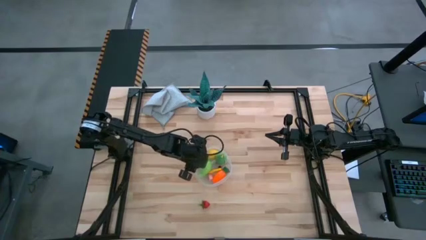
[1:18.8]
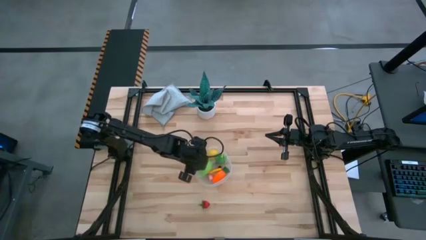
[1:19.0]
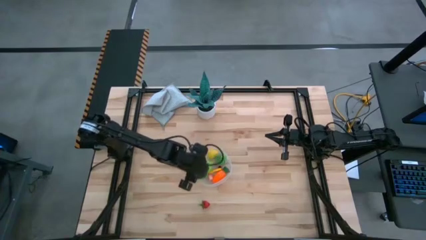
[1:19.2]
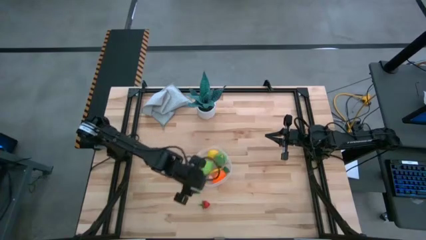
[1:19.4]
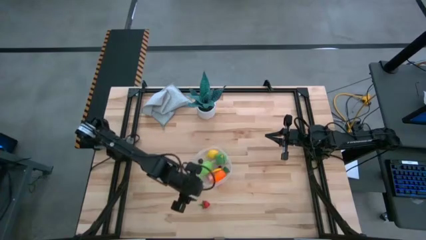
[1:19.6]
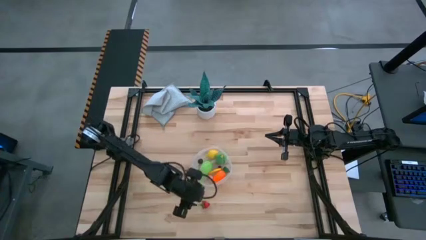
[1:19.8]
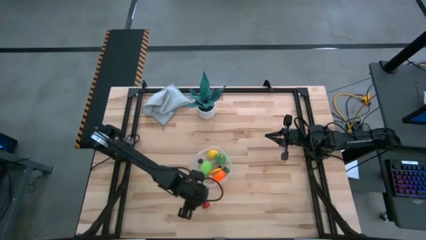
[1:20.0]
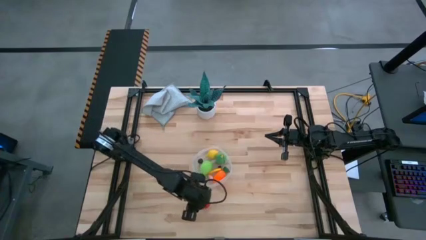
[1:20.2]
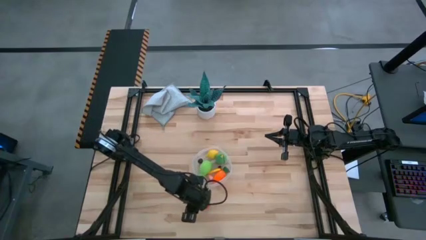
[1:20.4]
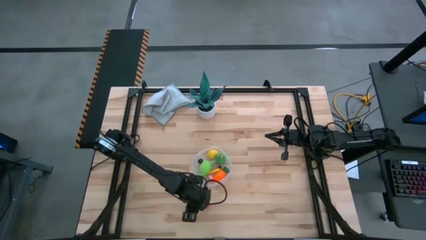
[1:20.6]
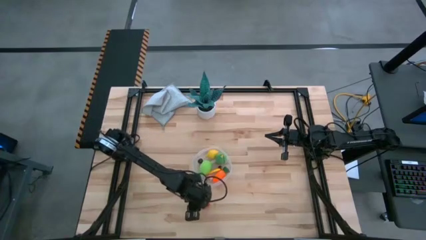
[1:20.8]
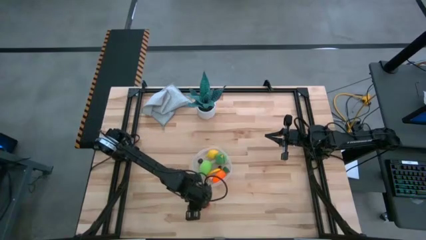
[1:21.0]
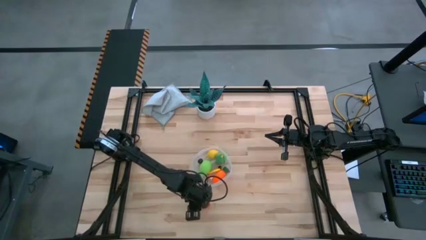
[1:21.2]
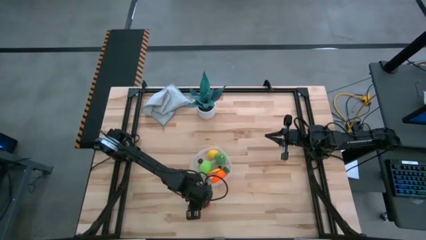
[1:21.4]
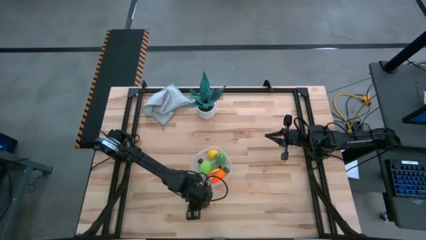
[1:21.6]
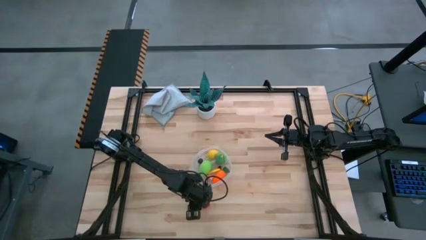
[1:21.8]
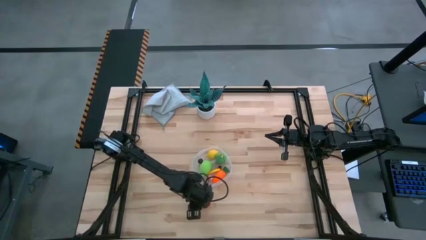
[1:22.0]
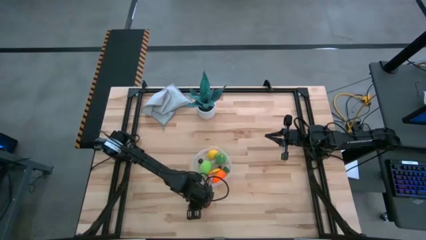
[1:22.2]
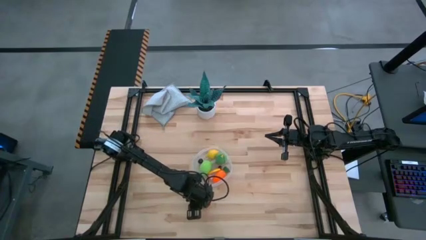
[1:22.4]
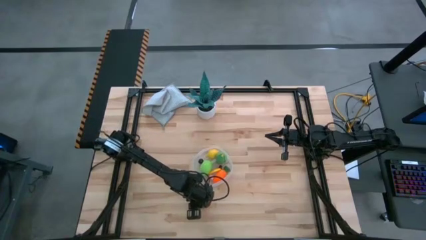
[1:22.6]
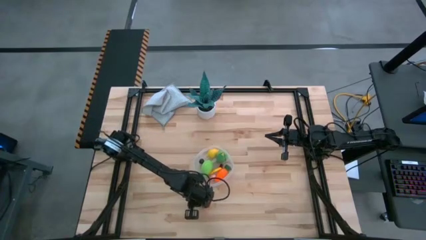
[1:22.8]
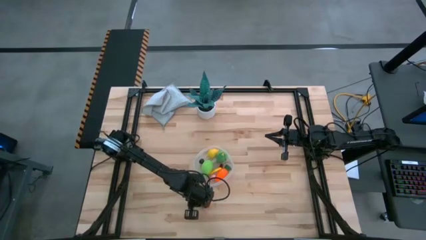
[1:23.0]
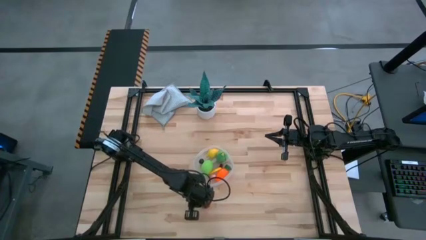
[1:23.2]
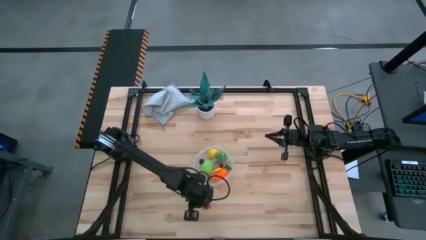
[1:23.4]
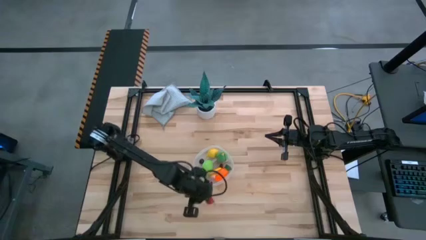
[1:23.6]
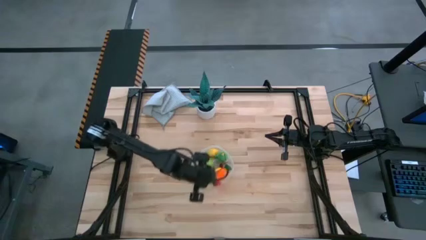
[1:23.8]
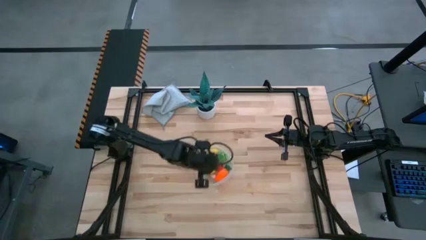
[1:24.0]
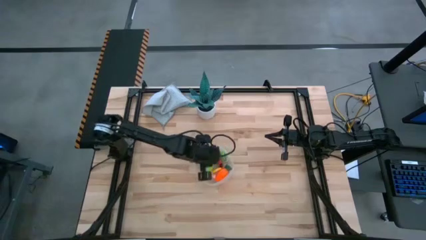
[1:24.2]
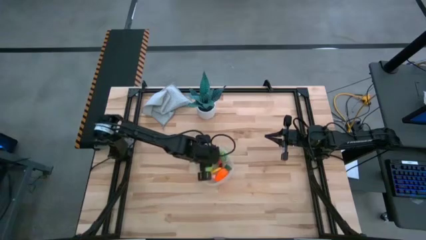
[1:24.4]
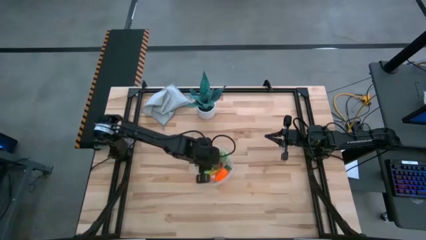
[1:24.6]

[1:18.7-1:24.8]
Task: Pick and placing Produce into tupperware
Put the strawberry into the bin

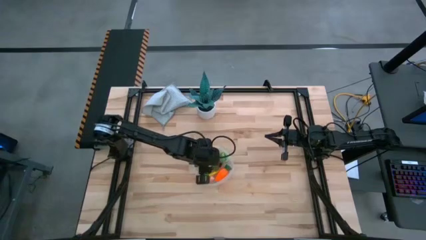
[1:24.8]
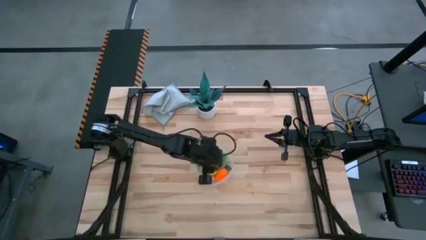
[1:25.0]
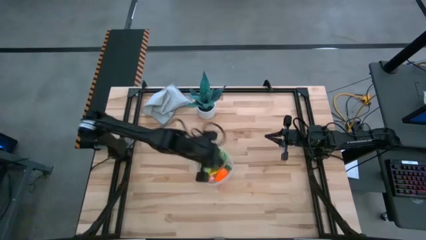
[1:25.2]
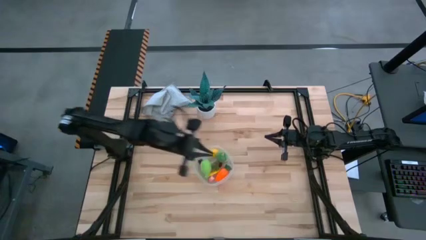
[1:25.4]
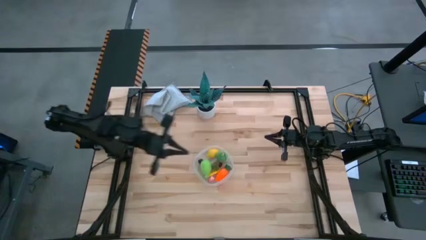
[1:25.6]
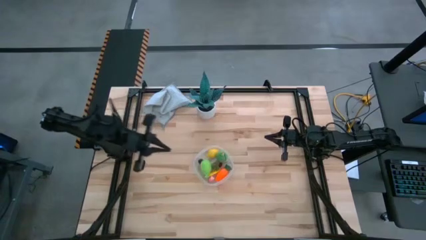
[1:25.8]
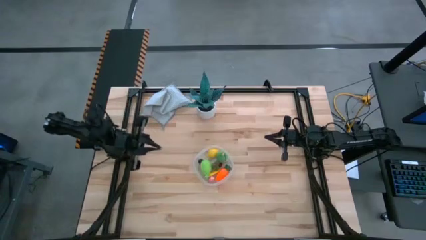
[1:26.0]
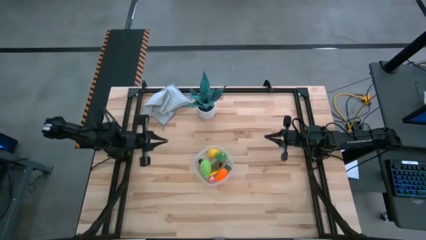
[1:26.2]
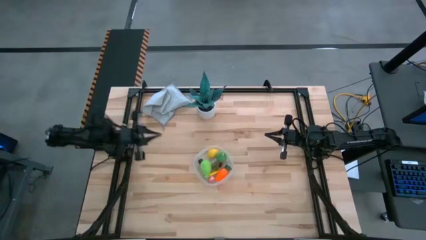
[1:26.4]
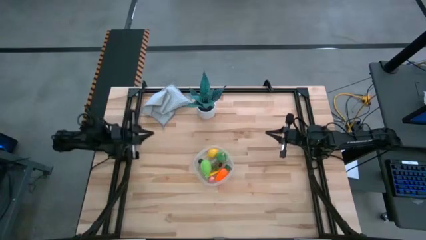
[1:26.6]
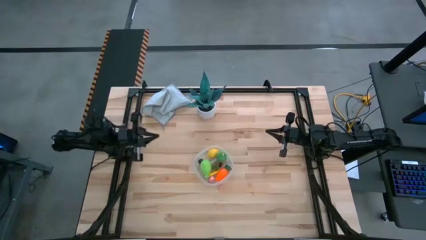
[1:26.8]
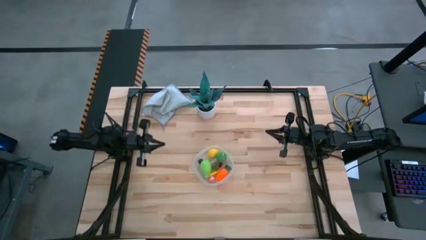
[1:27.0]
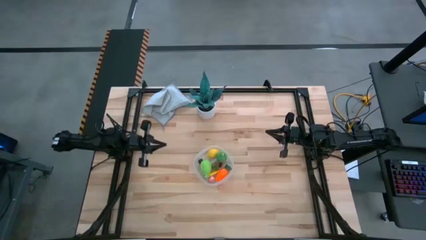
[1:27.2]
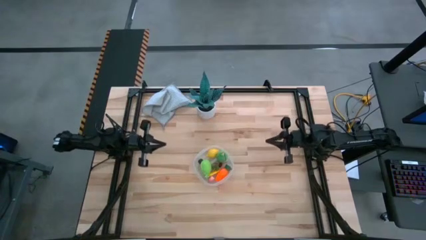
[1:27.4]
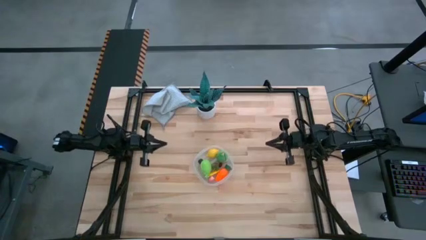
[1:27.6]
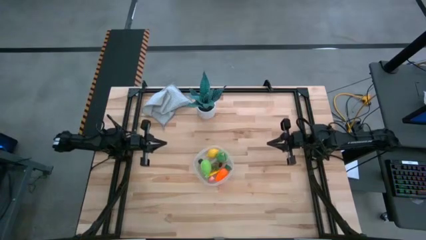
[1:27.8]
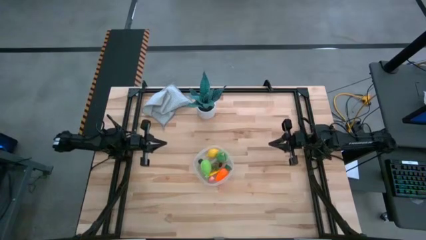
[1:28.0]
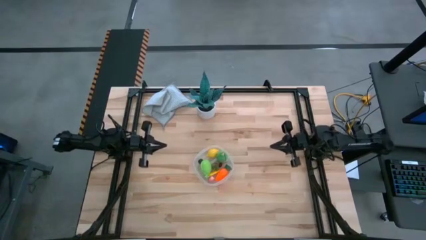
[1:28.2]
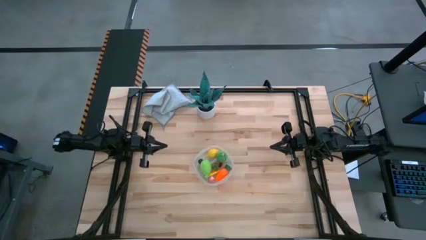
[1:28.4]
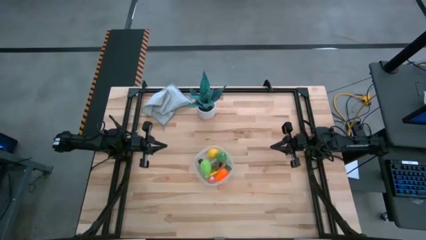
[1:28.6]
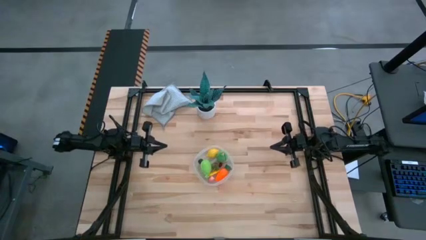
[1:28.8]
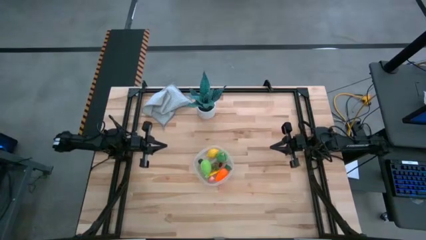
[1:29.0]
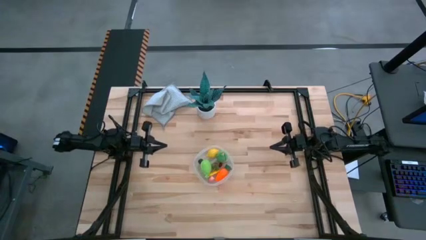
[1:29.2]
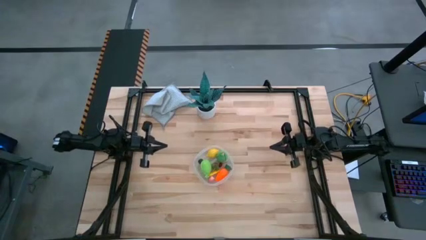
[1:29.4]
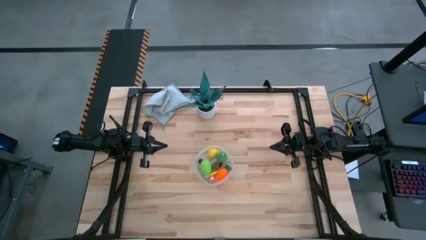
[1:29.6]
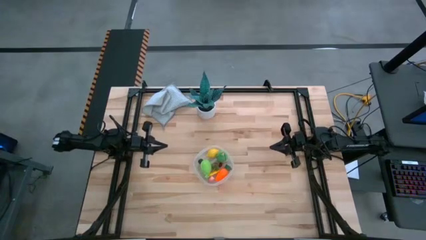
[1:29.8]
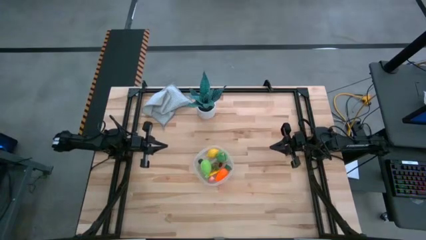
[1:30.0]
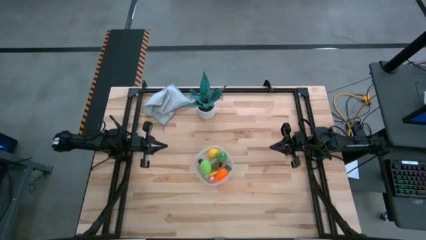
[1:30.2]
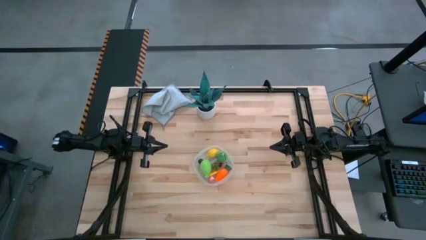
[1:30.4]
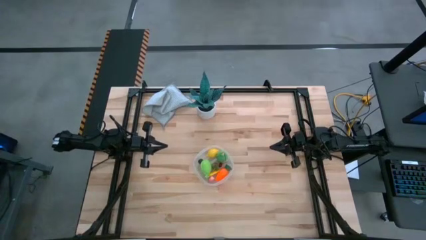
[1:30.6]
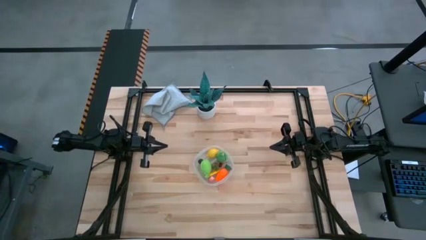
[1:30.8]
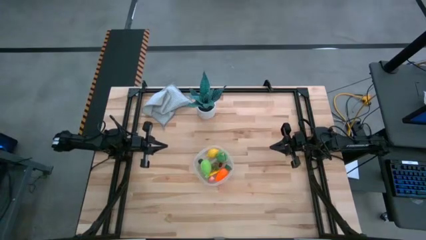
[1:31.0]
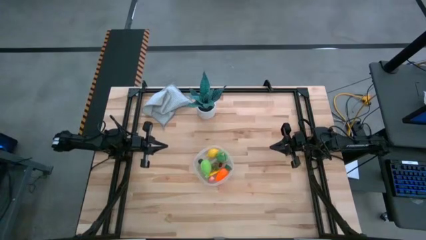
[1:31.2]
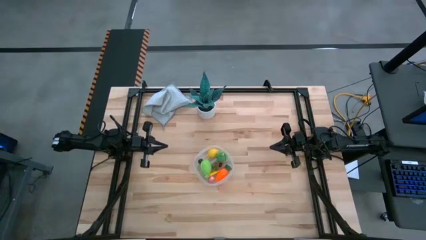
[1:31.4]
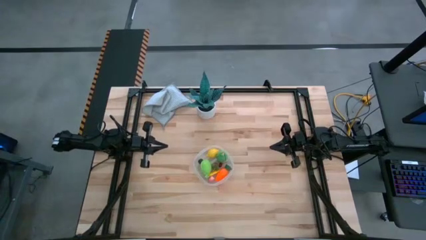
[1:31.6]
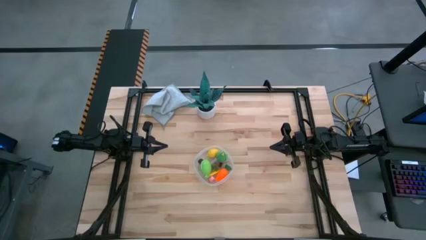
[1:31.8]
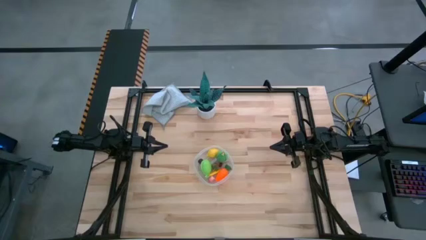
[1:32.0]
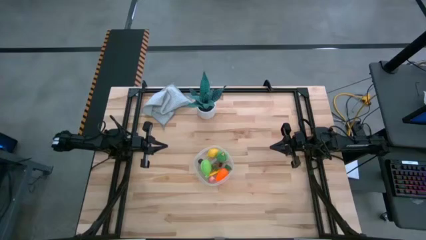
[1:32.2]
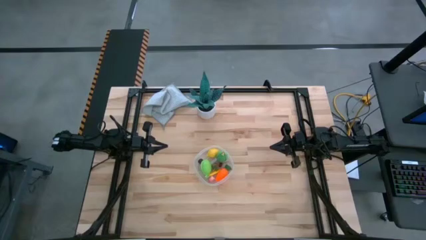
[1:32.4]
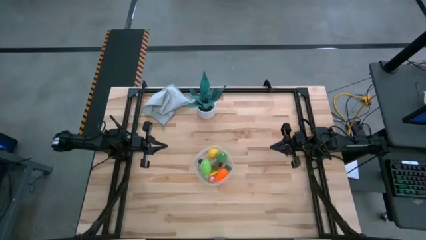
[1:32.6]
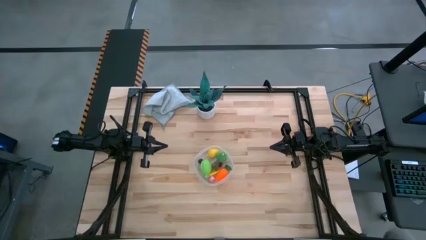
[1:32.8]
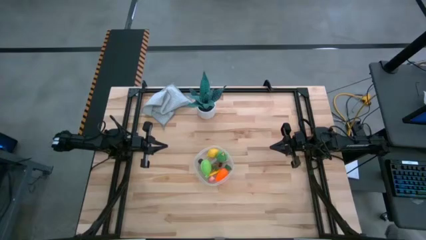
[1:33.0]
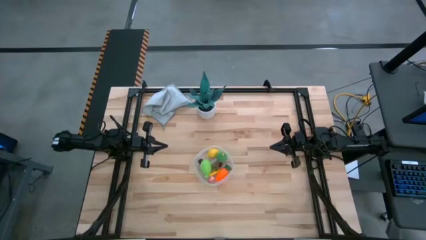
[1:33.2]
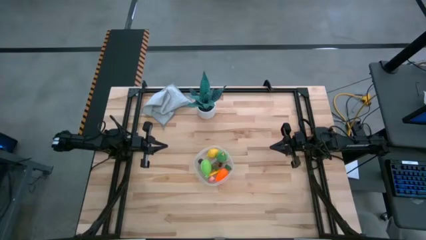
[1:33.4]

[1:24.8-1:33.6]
Return to Home Position

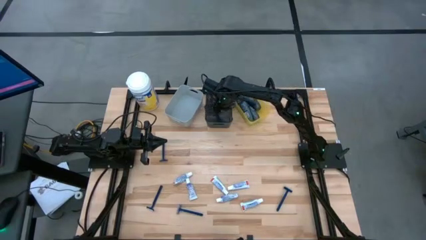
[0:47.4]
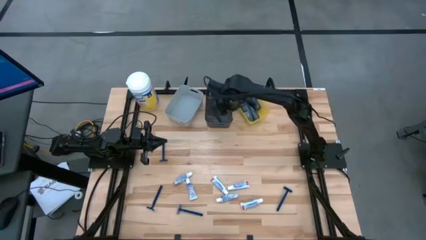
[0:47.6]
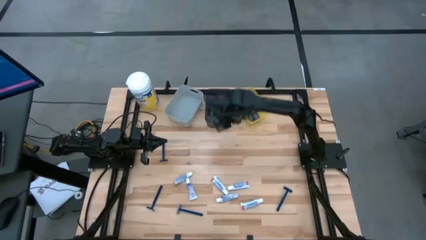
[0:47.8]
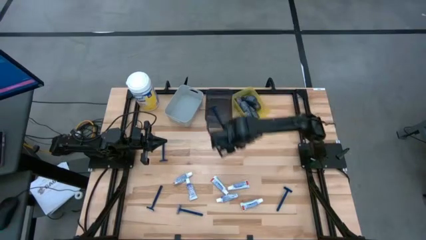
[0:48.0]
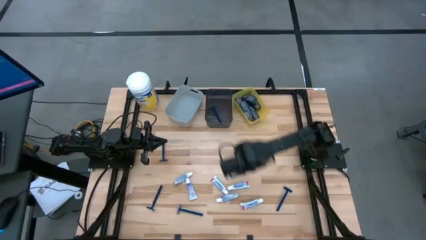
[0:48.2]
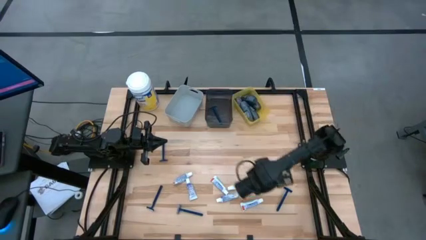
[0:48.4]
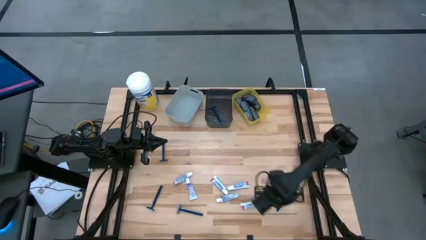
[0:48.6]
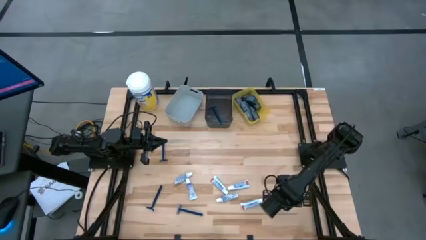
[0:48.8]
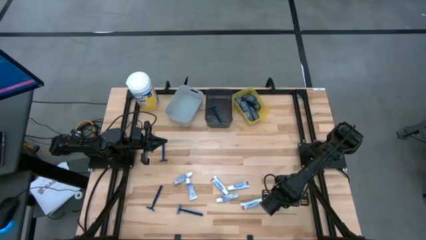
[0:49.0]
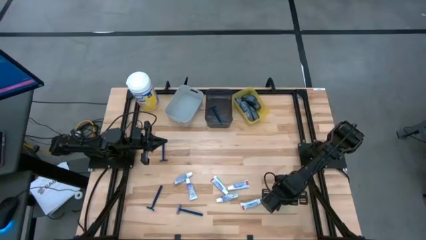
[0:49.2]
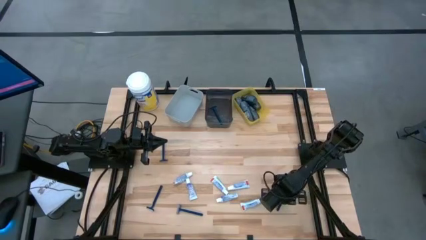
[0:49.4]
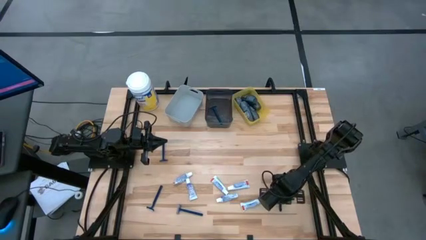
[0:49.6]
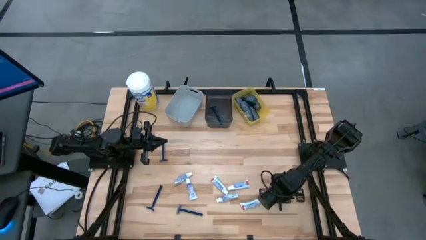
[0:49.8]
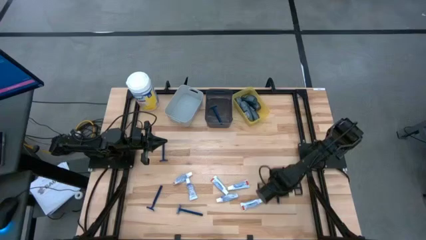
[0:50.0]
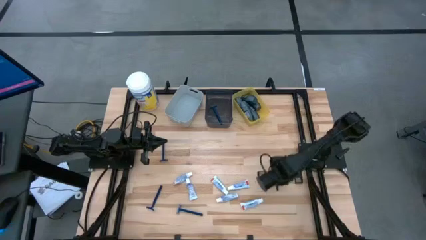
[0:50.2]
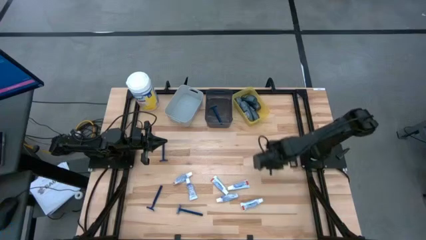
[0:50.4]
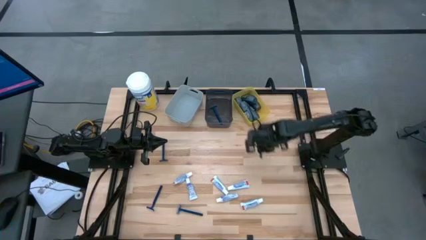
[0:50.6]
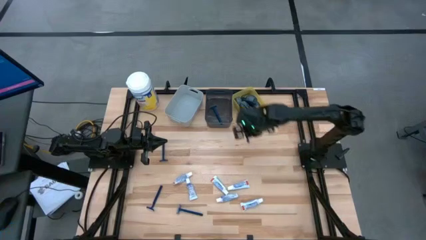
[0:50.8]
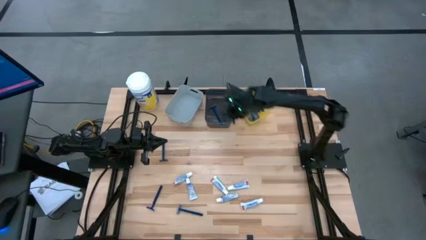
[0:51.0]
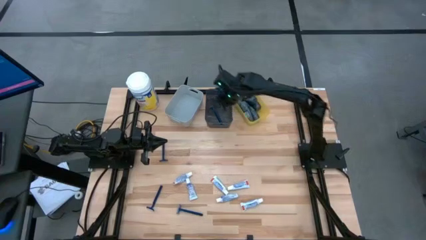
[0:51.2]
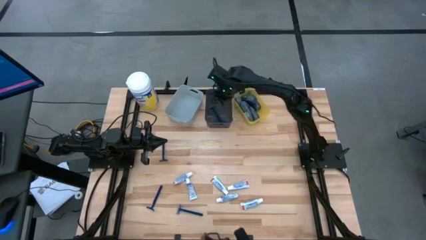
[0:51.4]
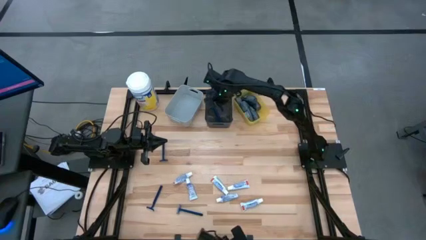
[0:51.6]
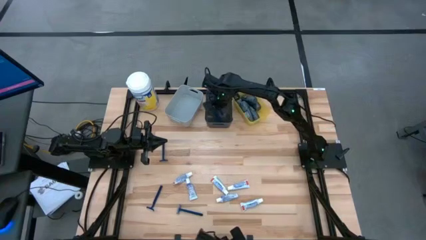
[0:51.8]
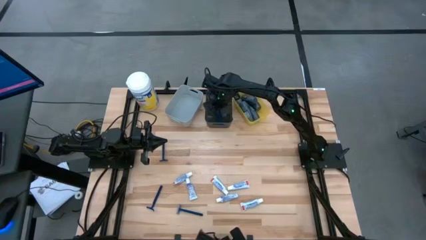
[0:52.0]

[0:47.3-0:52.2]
Task: Pick & Place Travel size toiletries
Put the razor into the black bin
